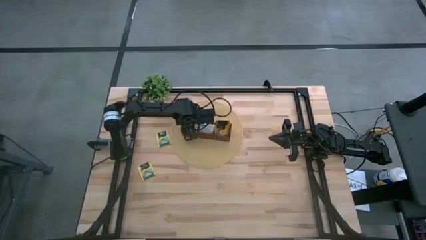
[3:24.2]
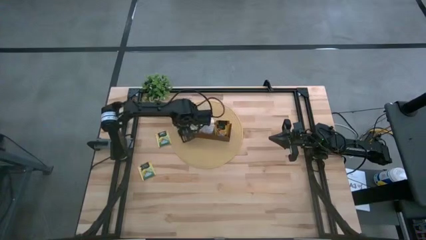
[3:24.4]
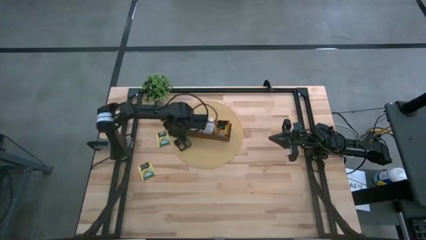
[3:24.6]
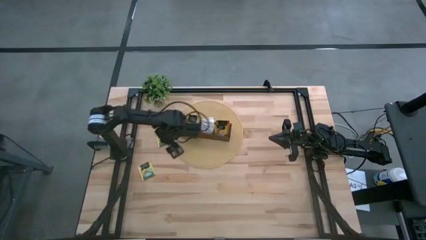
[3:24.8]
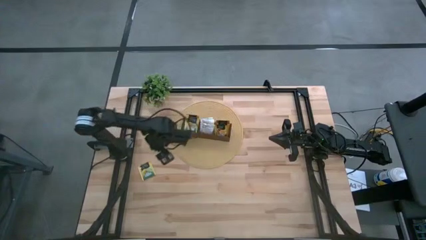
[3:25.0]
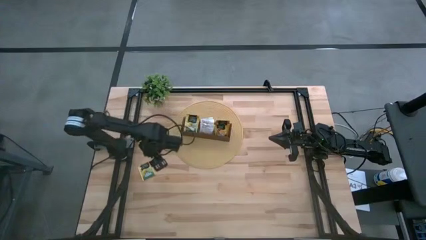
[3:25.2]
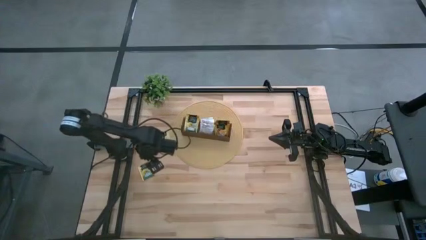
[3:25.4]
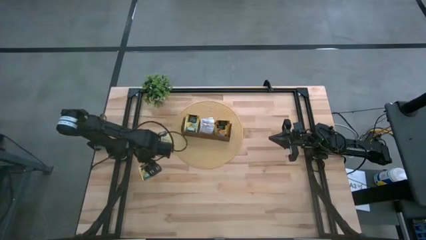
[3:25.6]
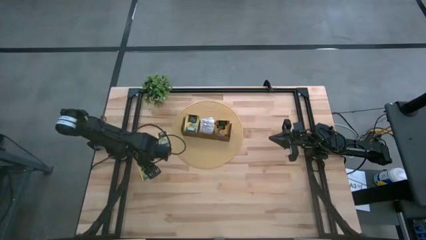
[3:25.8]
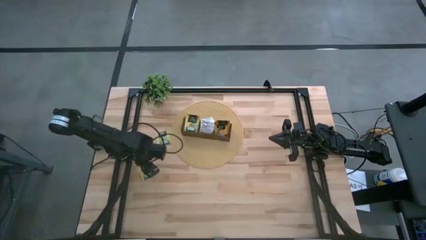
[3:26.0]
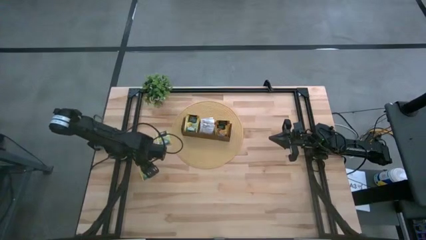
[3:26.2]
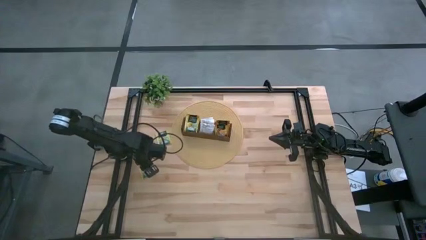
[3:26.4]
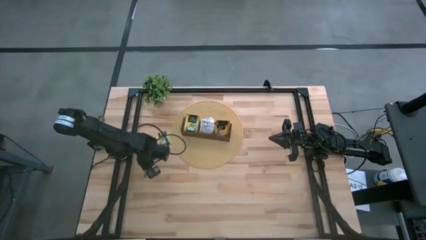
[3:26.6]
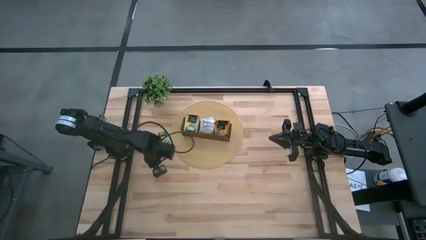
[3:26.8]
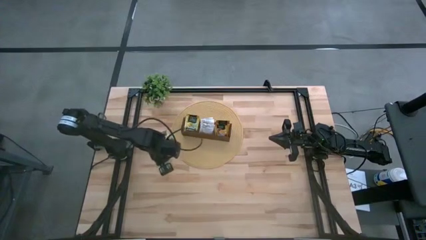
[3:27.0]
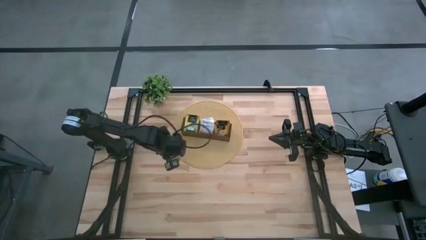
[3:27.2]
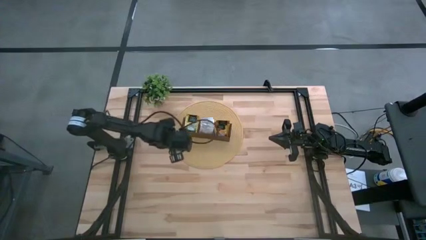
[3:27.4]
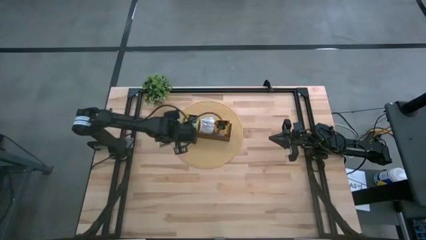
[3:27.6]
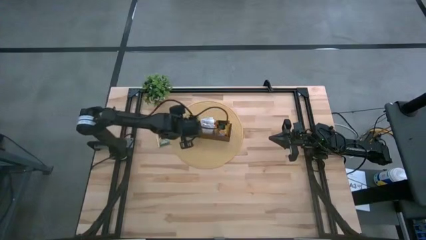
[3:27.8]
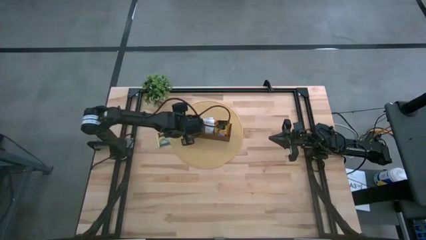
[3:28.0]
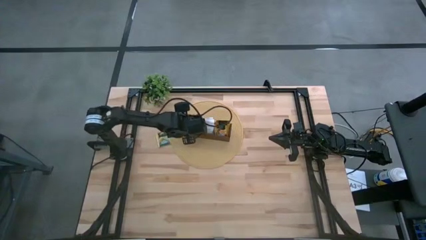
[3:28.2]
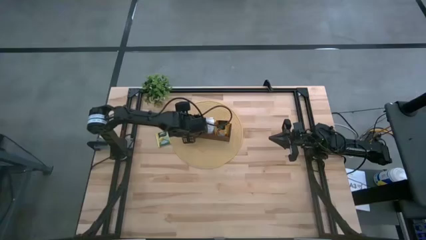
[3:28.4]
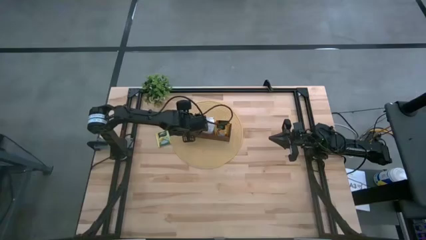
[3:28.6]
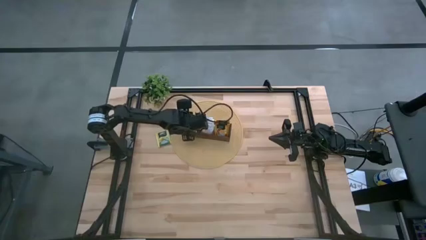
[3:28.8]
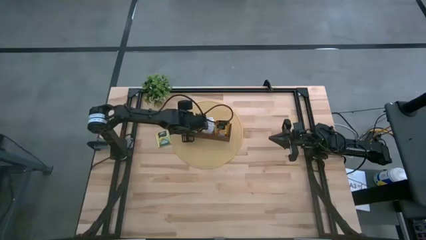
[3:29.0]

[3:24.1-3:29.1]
Task: Pick & Place Tea
Put the yellow tea bag into the left section of the wooden organizer

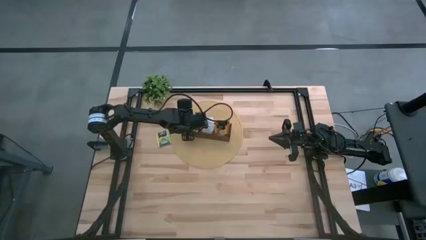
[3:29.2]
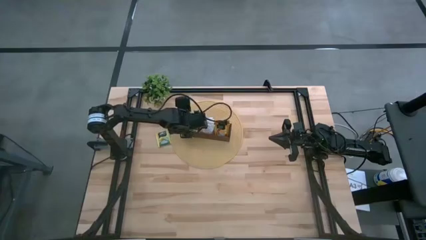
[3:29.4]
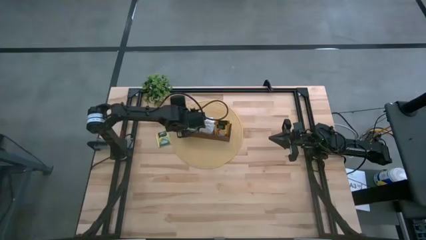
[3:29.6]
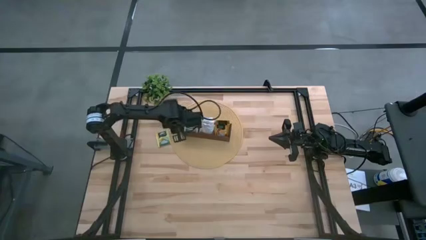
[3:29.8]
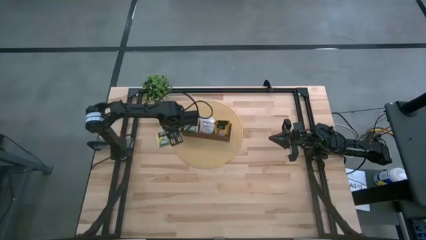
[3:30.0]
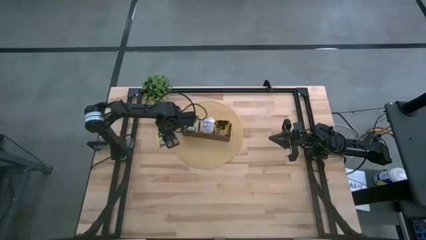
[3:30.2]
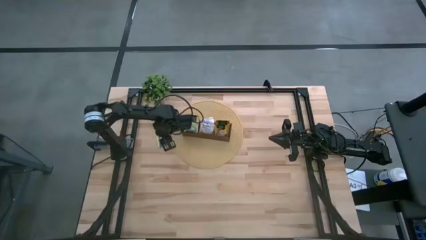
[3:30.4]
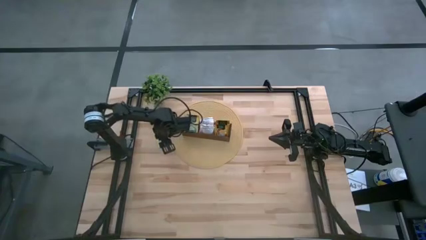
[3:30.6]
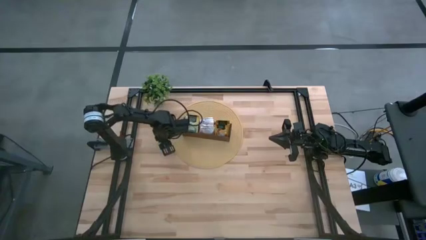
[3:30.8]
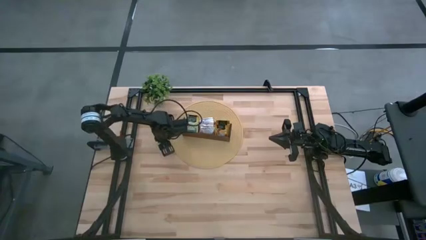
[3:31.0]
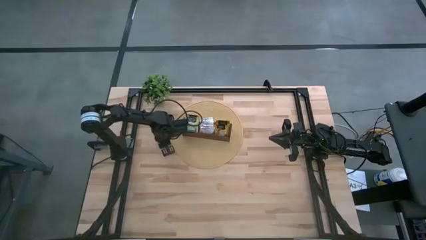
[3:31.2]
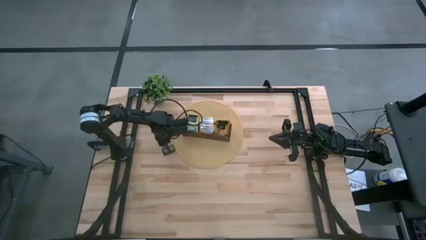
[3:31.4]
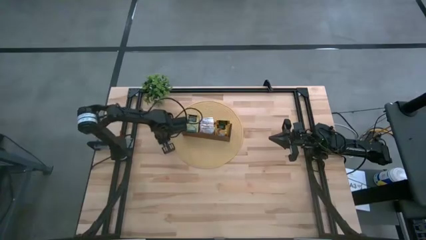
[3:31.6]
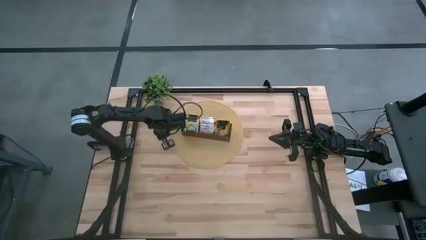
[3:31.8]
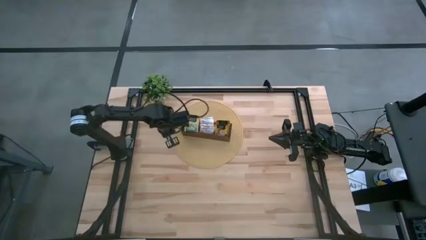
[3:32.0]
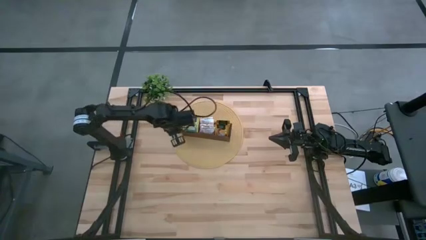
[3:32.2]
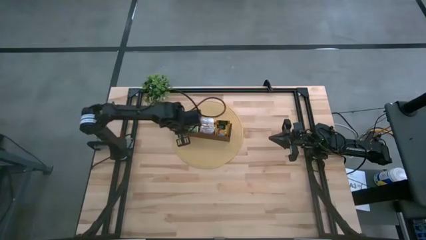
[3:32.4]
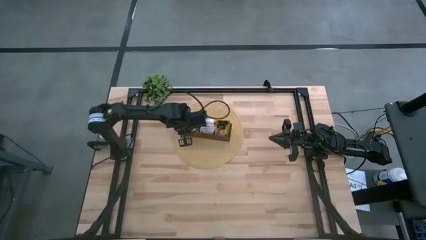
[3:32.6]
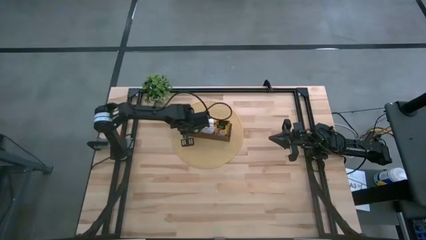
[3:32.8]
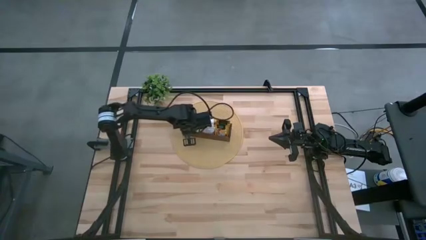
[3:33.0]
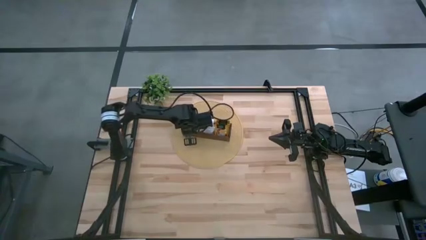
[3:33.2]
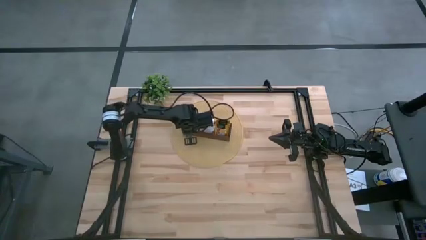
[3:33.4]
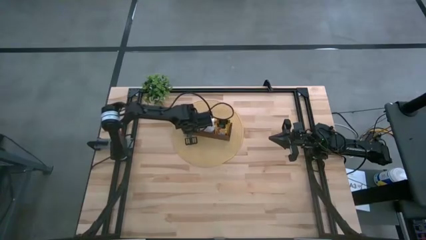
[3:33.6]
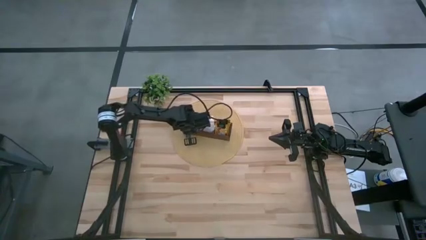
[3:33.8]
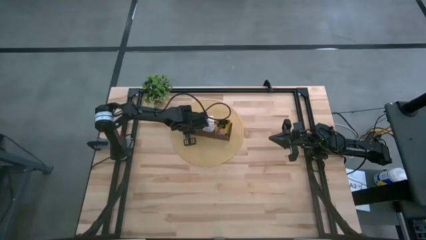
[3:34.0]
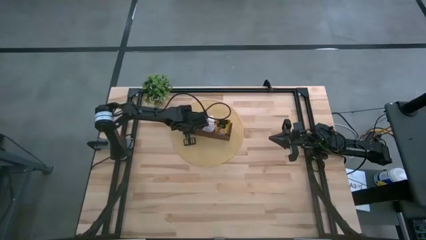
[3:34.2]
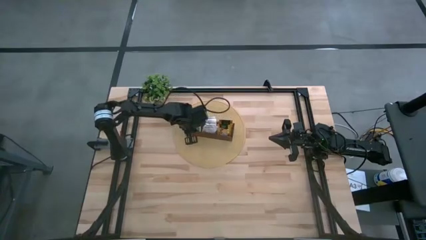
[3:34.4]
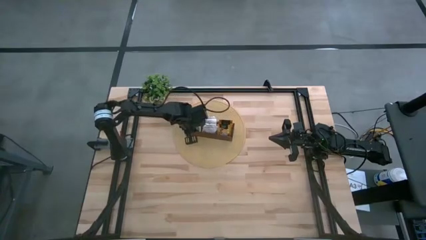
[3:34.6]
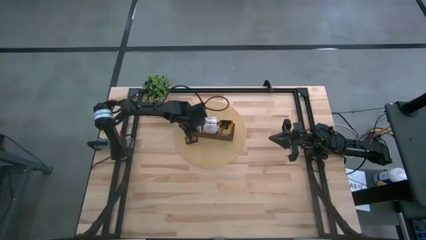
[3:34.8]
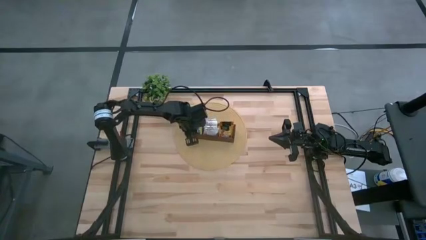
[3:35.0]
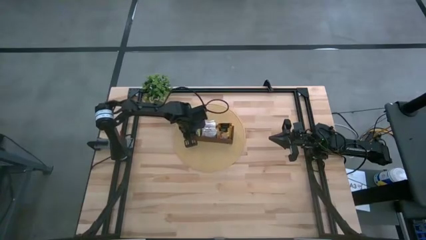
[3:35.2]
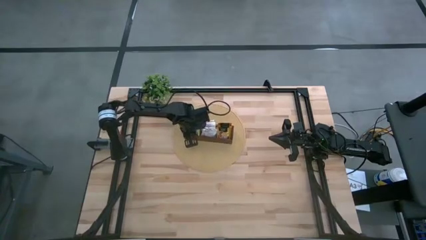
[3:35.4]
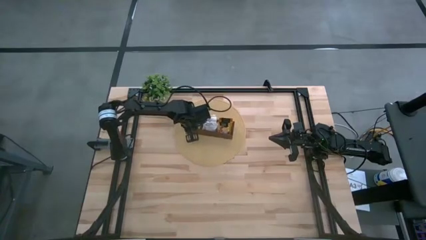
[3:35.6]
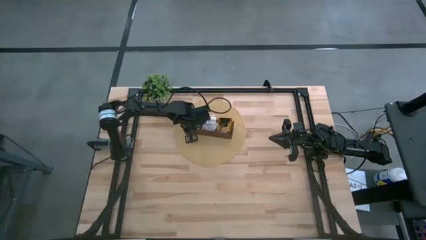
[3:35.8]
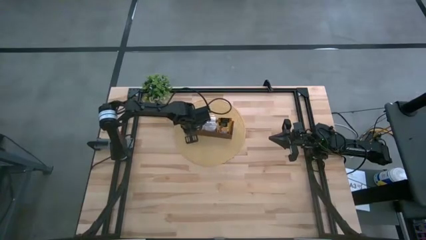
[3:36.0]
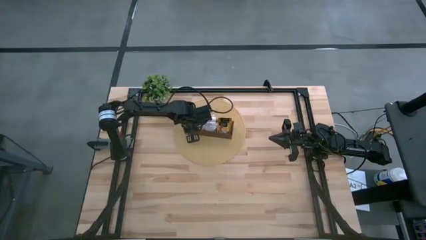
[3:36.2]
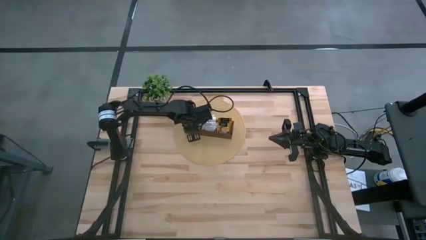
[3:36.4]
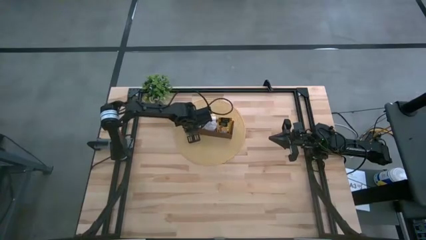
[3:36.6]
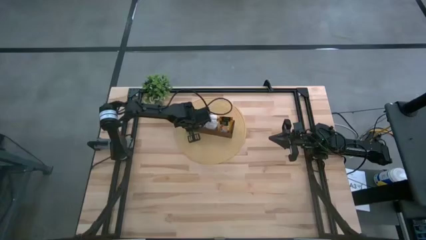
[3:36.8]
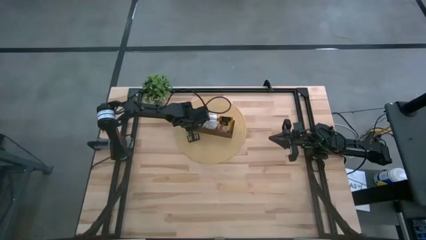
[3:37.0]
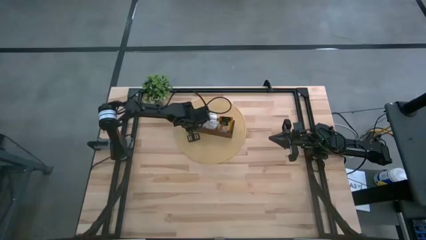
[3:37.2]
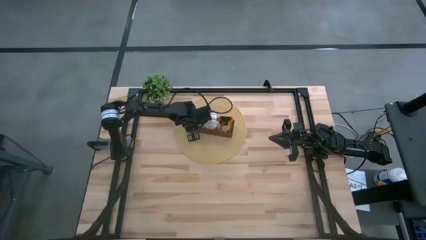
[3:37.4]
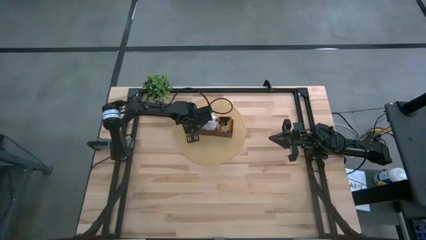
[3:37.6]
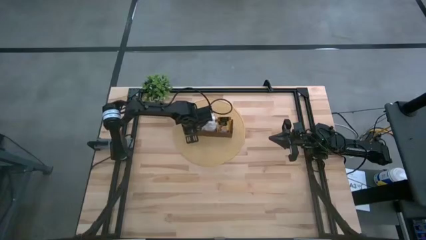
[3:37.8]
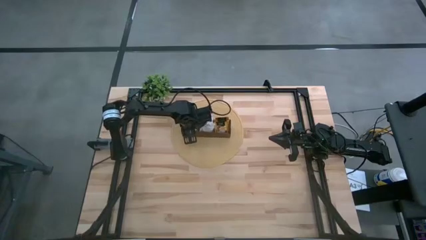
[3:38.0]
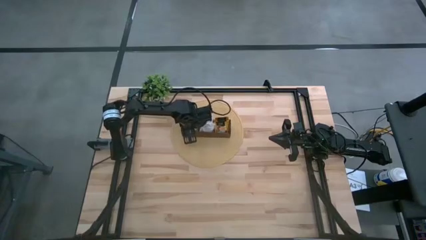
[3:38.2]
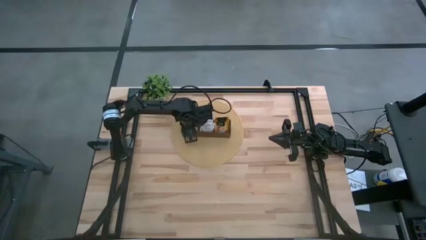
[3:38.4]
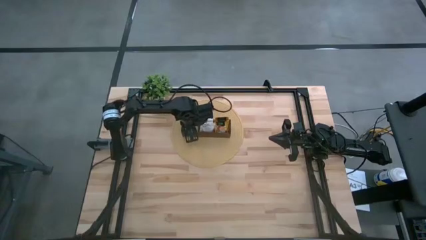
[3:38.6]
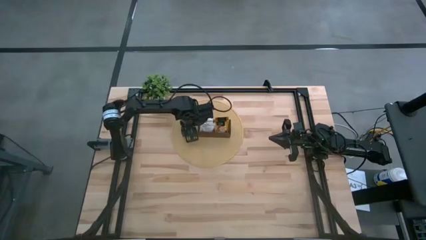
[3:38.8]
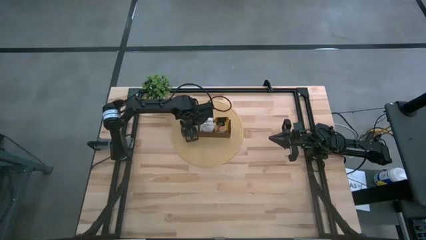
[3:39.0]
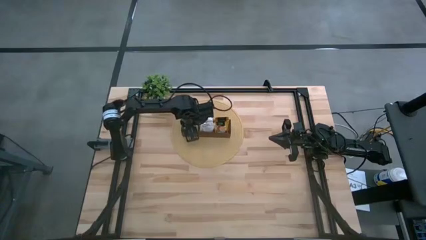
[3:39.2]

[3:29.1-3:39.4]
Put the yellow tea bag into the left section of the wooden organizer
